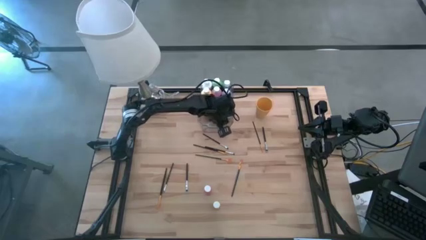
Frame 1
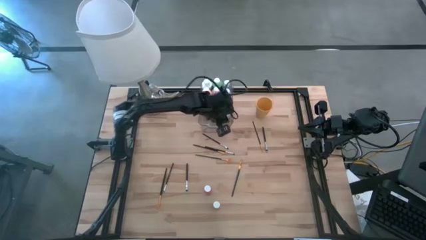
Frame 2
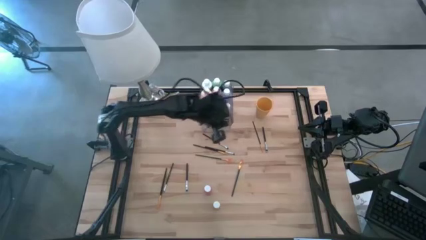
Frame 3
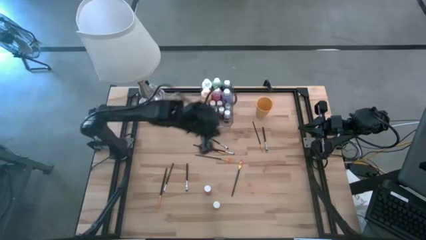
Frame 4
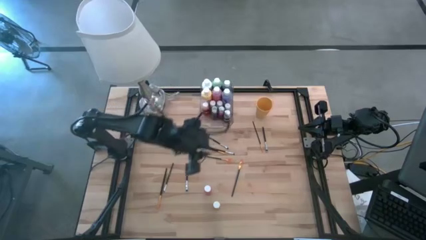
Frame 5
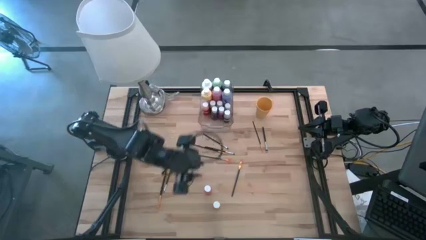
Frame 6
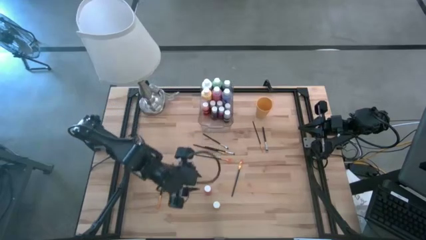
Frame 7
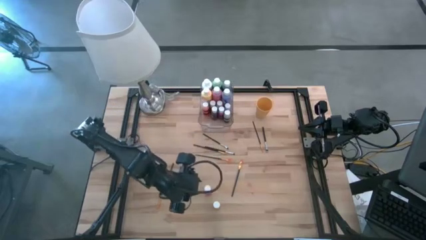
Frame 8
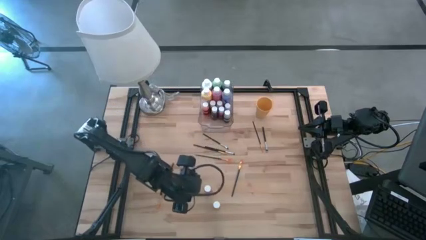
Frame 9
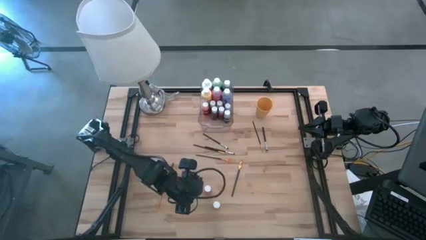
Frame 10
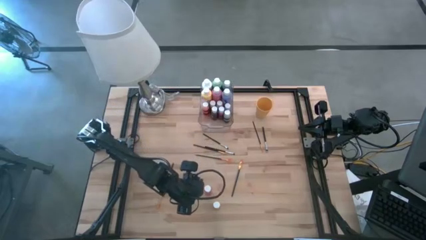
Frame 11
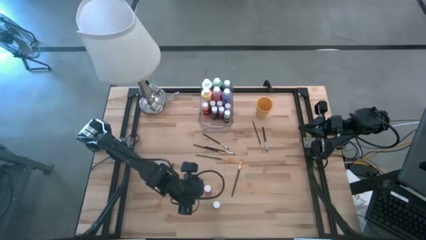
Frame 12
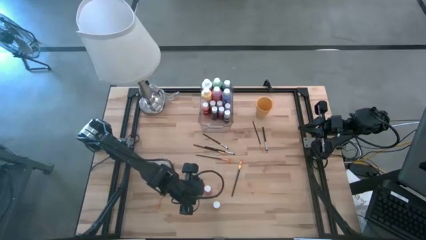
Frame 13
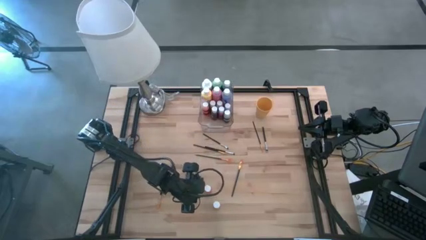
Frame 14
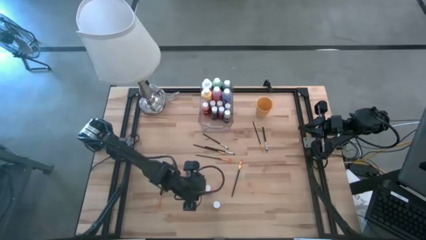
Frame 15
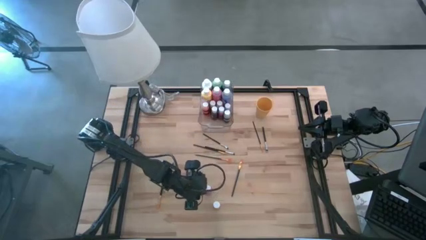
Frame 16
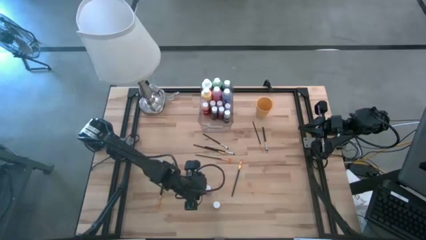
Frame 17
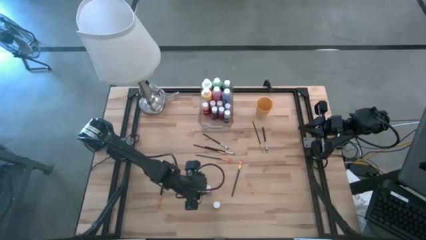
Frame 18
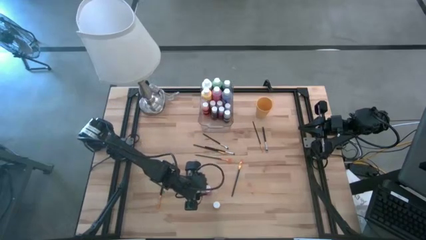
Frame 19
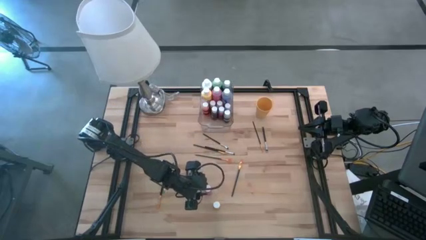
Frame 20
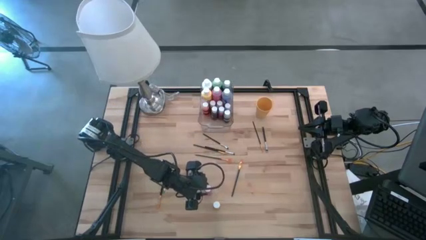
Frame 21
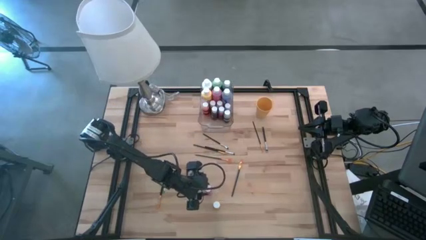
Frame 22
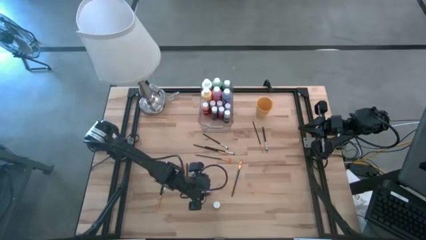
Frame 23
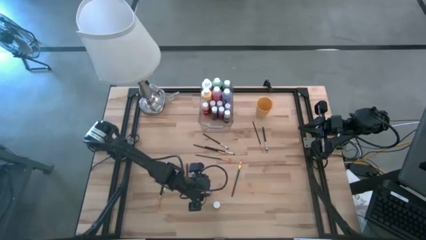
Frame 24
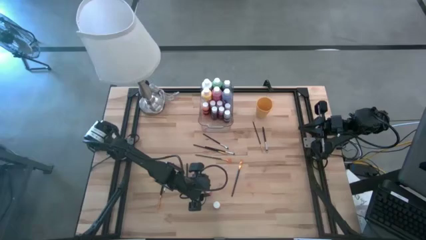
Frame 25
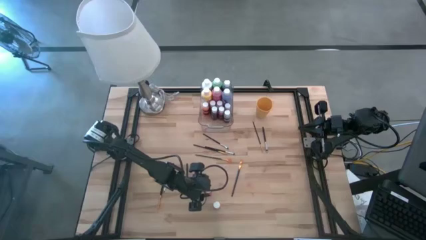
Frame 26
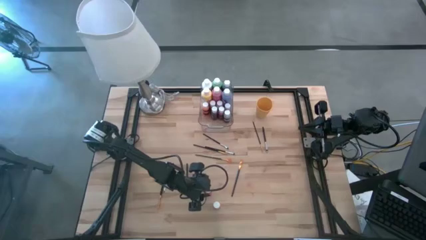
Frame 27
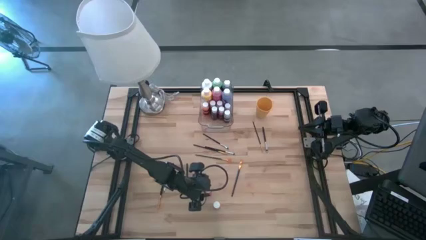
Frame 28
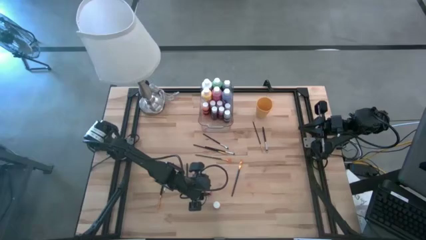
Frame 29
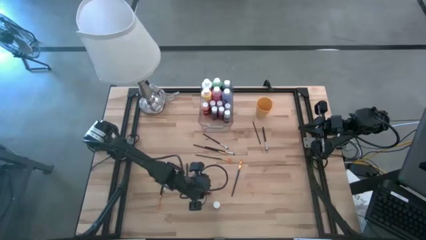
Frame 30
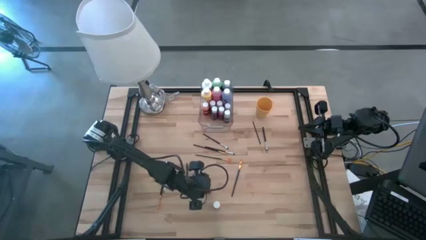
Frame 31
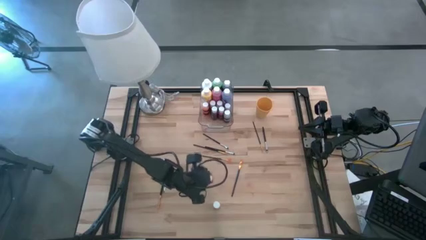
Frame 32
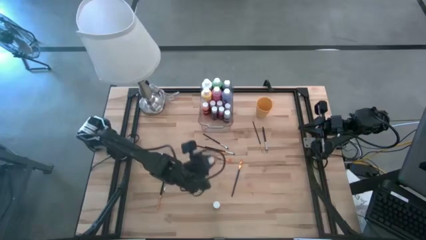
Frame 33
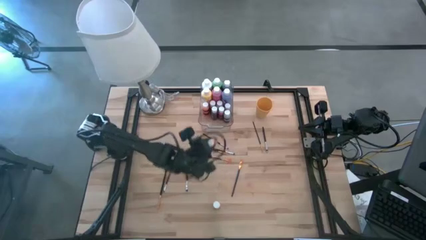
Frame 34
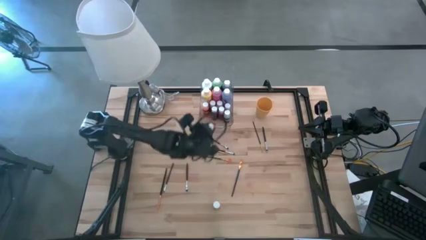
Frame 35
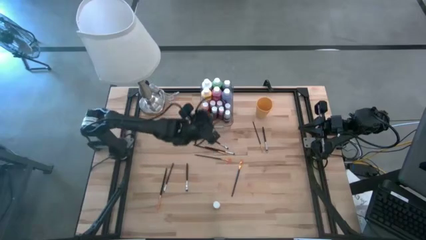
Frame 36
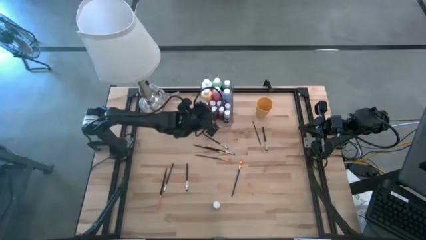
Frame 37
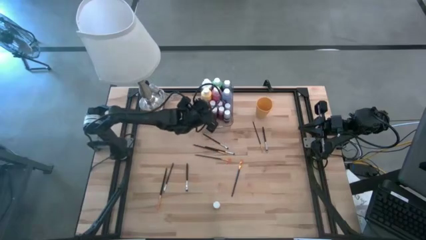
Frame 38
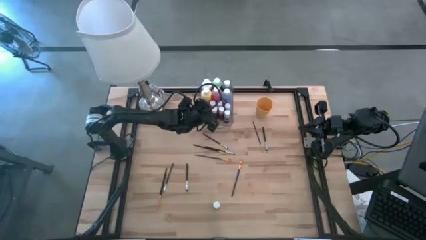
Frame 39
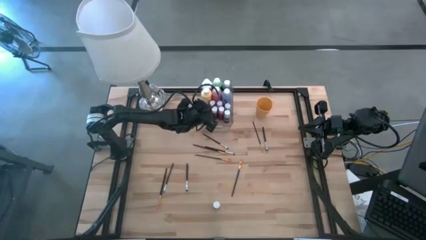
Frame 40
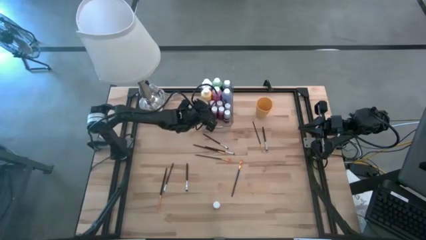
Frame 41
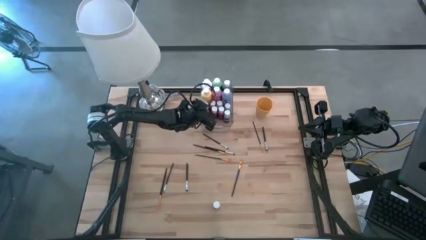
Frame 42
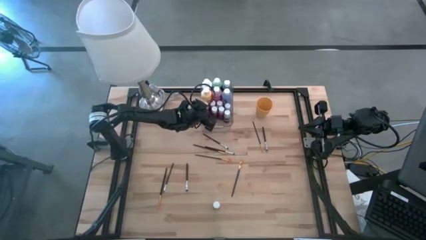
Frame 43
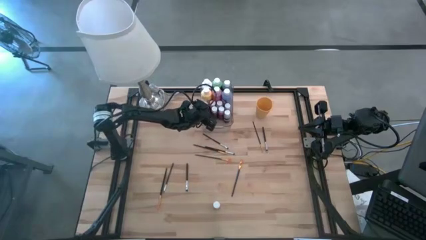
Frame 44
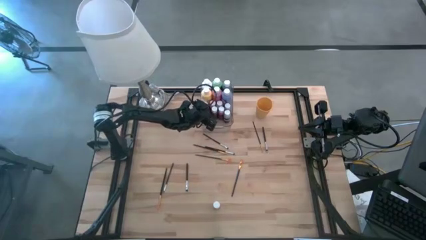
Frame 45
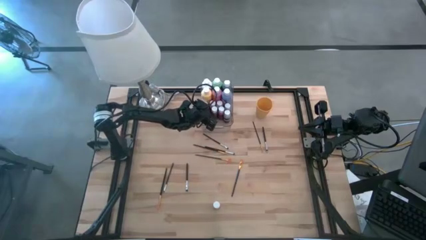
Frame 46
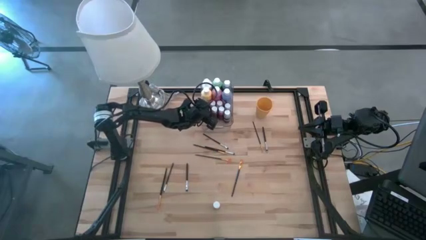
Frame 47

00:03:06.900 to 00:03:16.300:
Task: Pick & Place Paint Supplies
Put the small red paint bottle into the bin

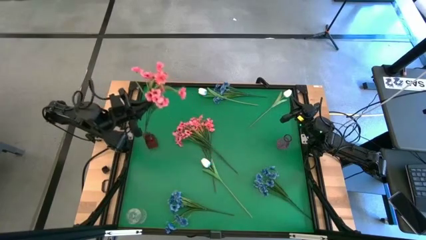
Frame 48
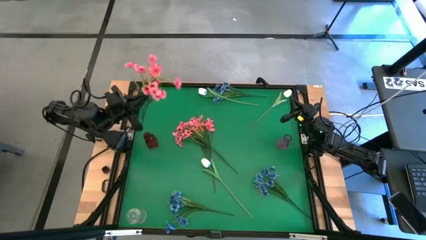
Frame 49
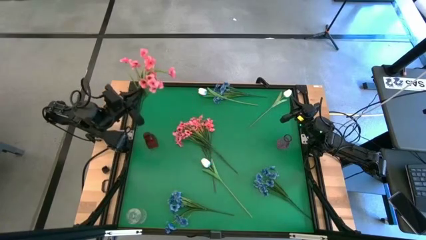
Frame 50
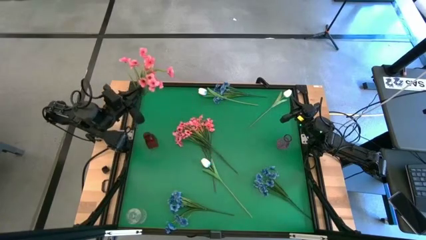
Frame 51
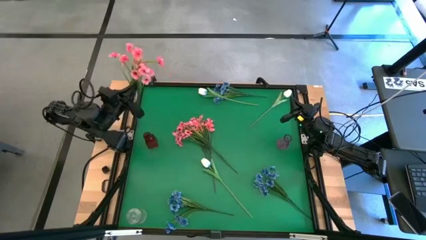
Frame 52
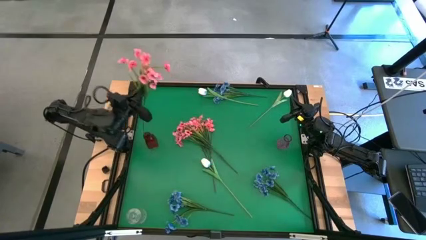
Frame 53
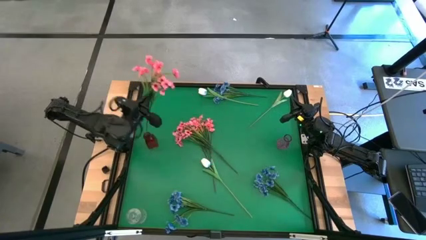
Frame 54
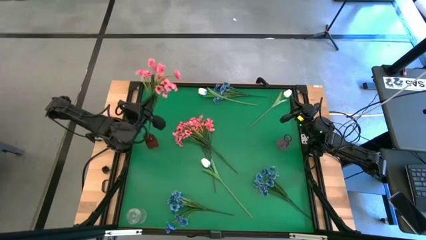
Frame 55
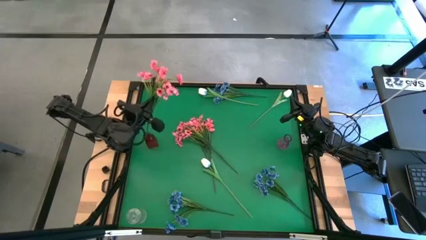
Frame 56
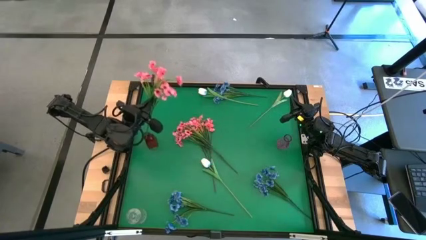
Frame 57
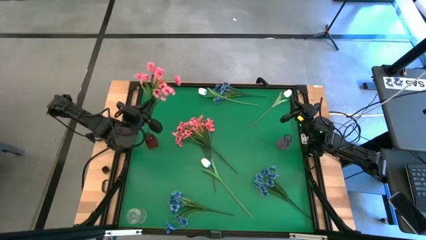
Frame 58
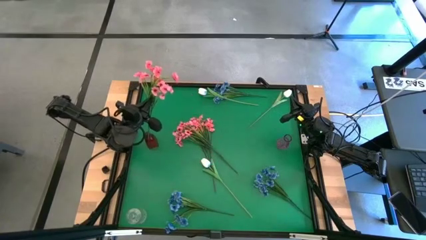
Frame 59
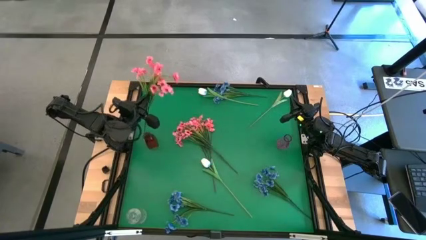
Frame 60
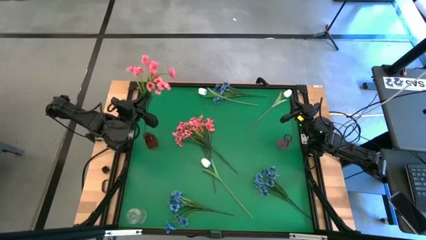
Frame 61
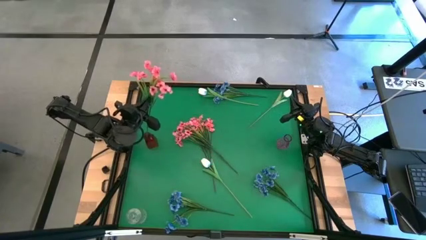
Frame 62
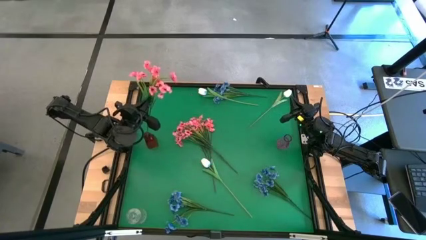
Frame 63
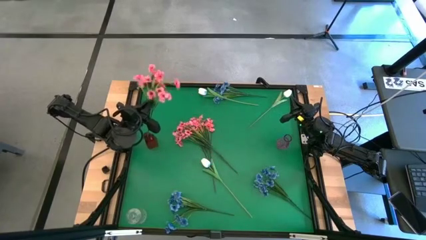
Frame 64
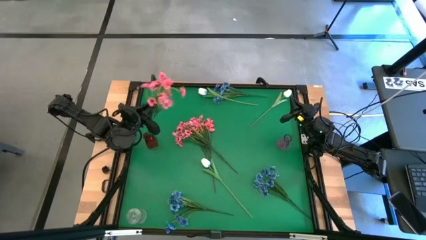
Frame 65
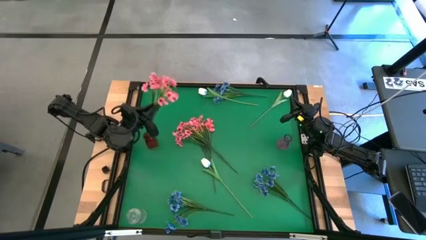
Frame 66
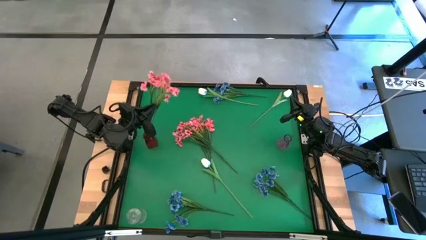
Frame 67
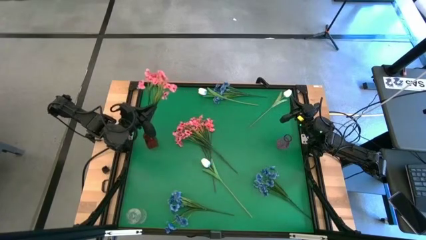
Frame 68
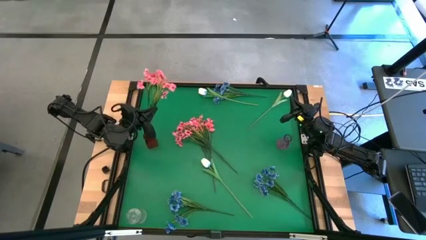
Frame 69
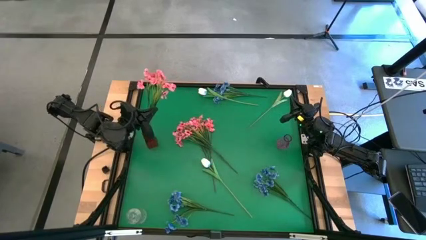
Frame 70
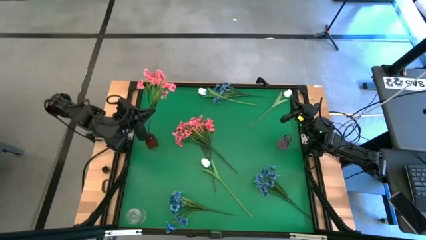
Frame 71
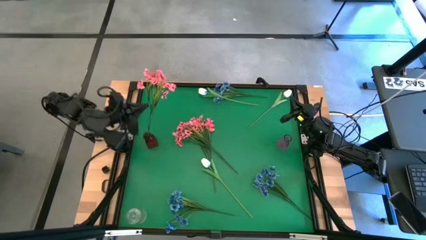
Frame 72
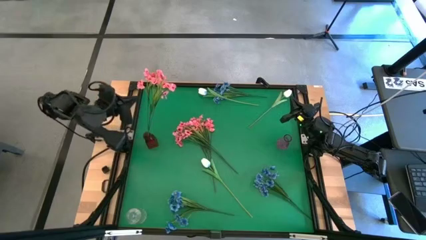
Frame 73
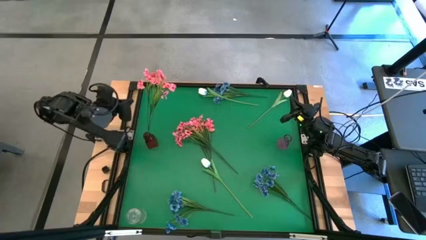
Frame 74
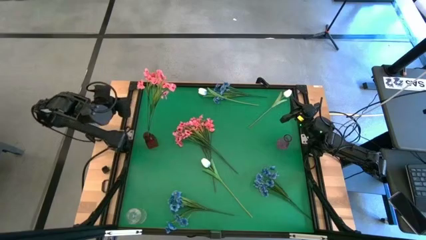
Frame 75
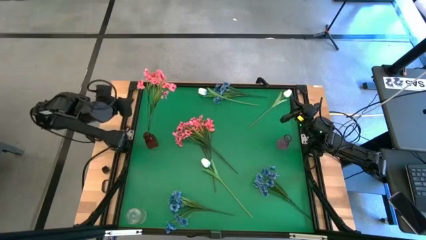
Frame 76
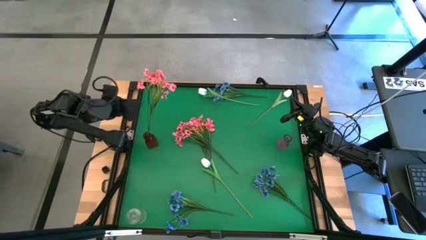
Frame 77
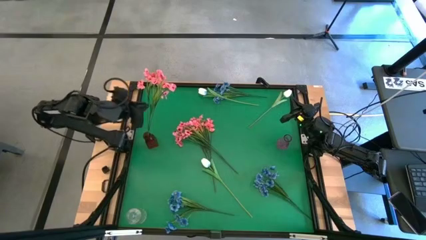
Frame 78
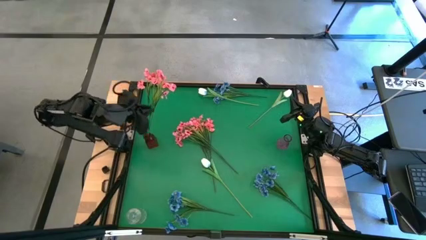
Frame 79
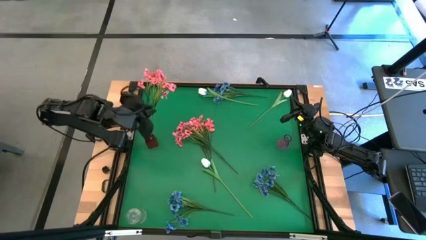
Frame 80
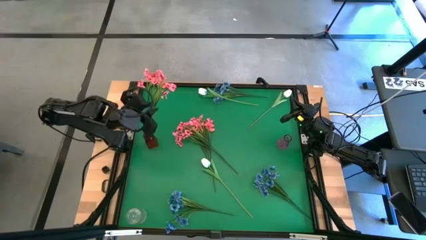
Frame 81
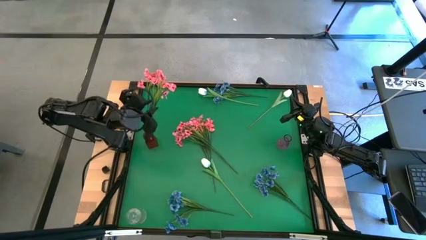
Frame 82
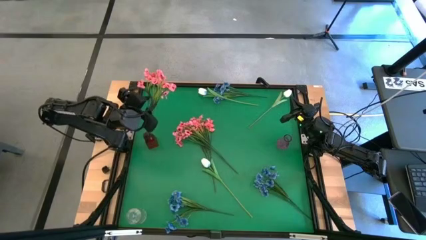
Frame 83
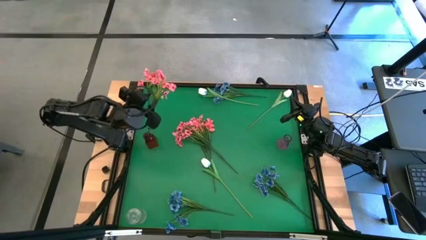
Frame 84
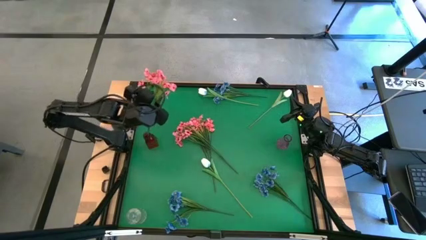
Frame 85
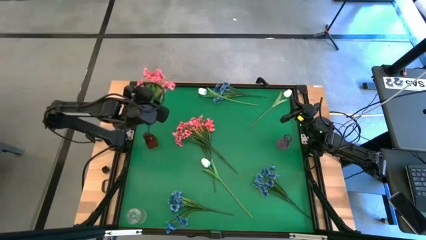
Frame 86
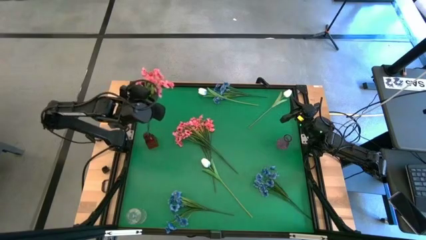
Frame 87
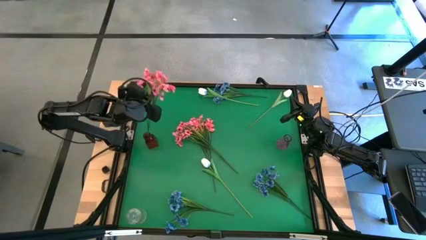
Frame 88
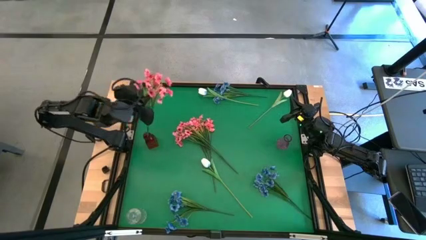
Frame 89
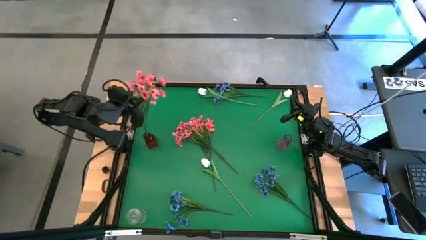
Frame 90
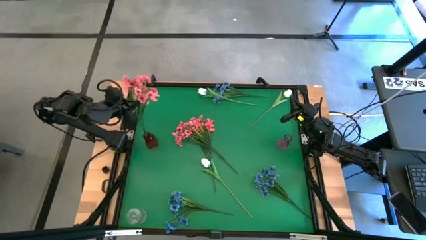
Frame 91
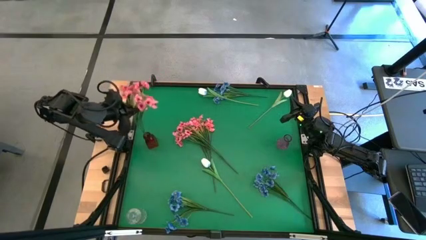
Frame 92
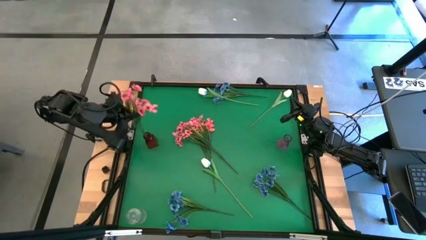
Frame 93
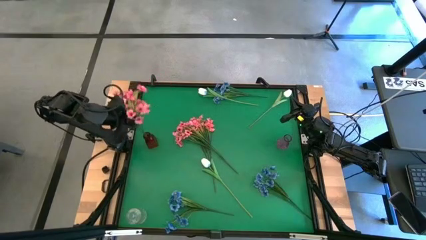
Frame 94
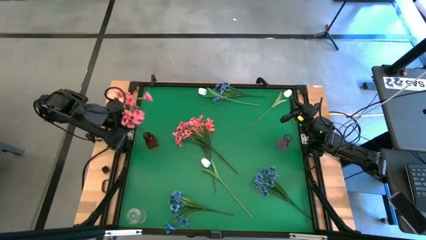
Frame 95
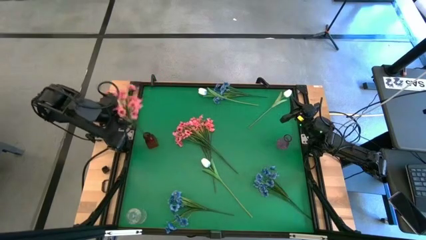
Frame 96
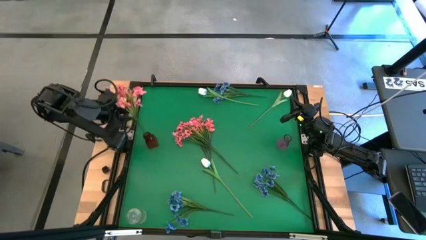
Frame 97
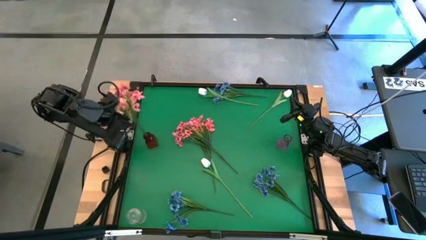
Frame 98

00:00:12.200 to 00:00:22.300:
Task: Sort flowers into vase by color
Put the top left pink flower into the red vase
